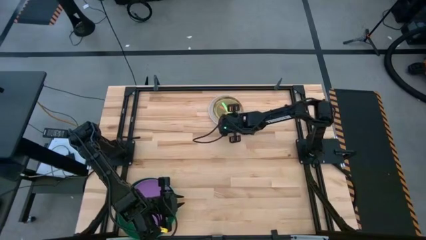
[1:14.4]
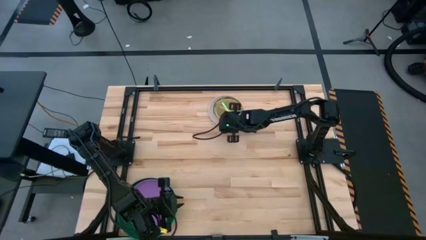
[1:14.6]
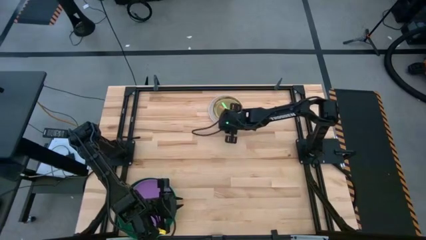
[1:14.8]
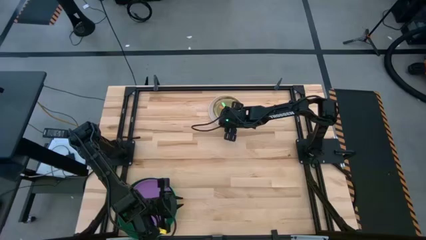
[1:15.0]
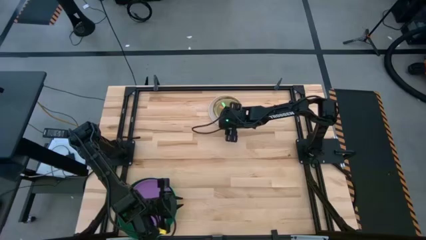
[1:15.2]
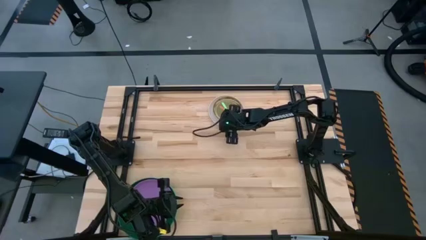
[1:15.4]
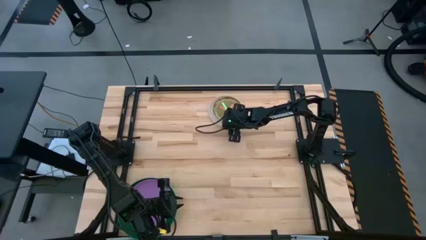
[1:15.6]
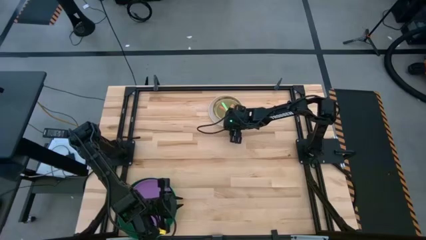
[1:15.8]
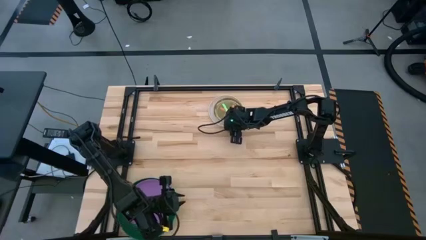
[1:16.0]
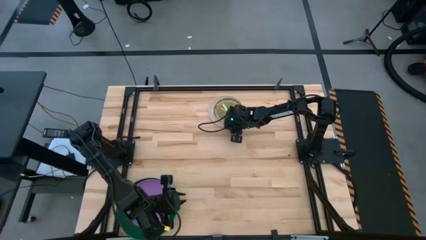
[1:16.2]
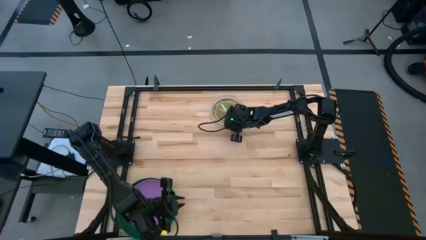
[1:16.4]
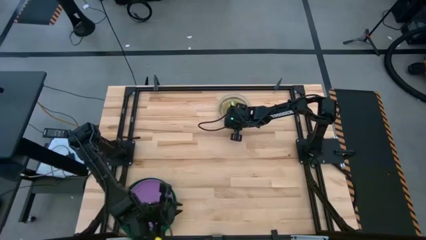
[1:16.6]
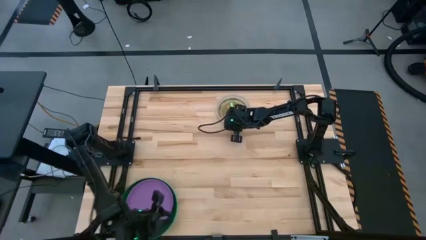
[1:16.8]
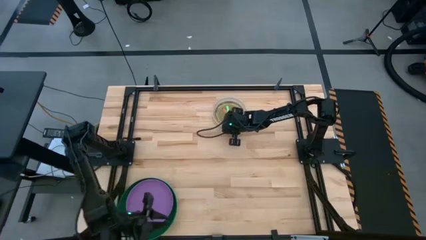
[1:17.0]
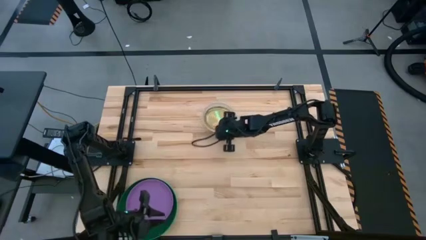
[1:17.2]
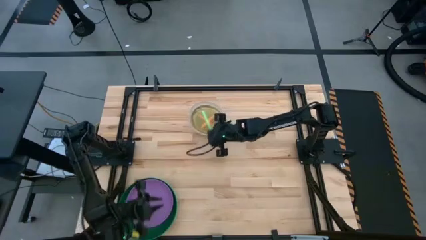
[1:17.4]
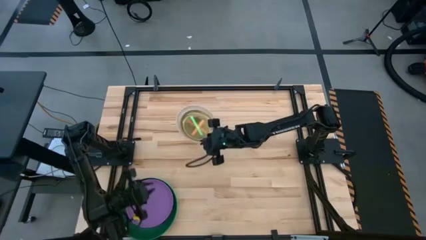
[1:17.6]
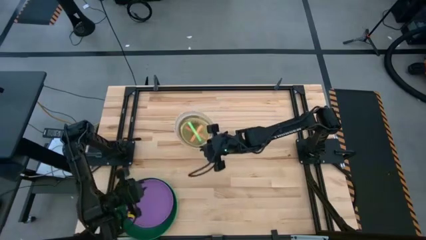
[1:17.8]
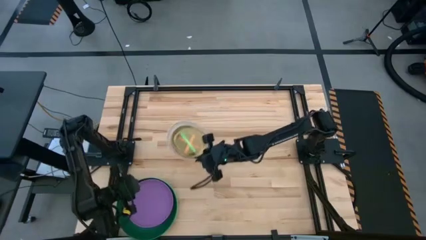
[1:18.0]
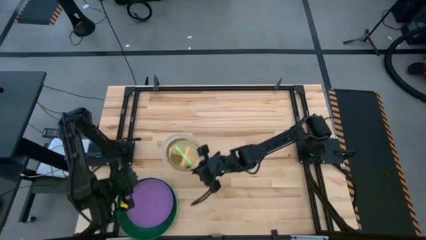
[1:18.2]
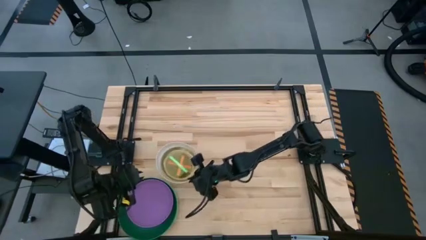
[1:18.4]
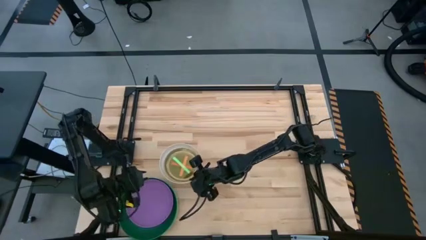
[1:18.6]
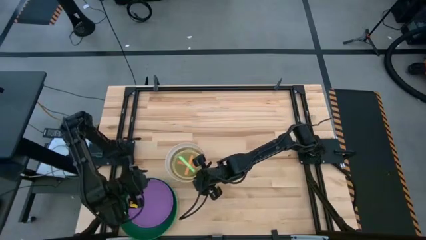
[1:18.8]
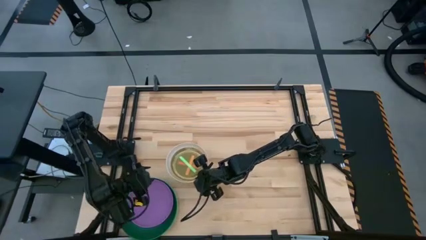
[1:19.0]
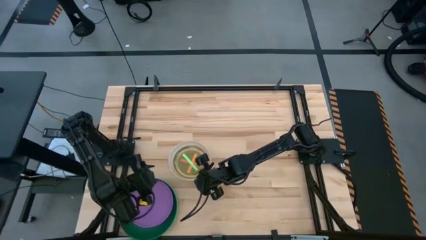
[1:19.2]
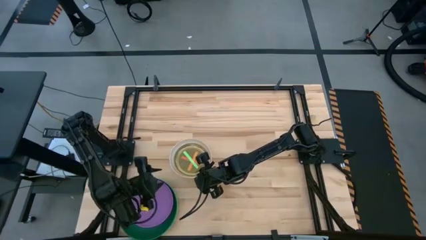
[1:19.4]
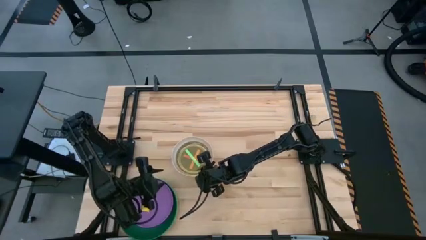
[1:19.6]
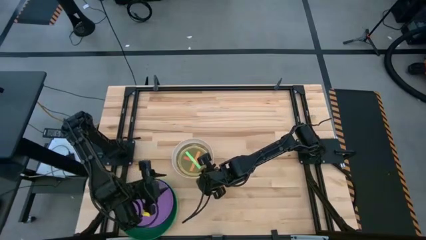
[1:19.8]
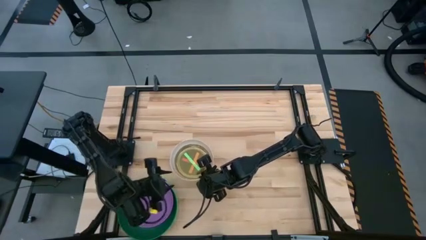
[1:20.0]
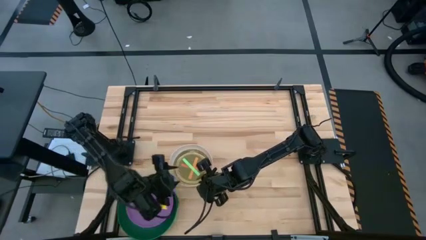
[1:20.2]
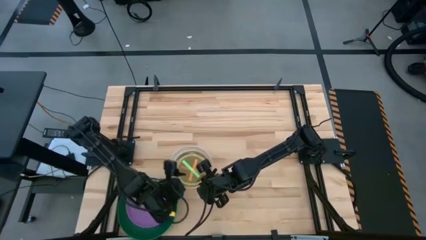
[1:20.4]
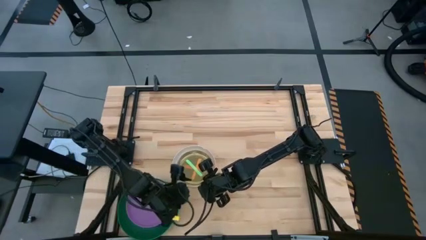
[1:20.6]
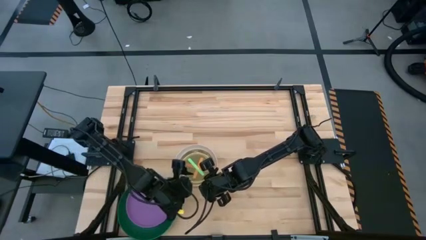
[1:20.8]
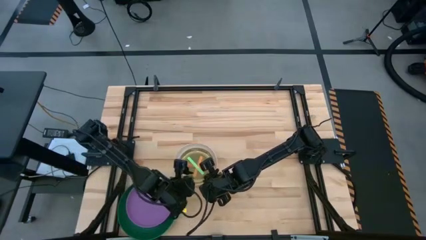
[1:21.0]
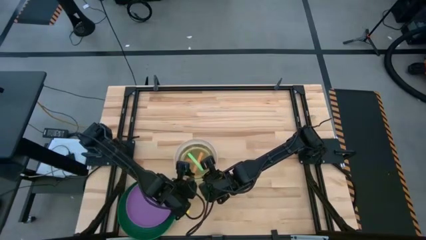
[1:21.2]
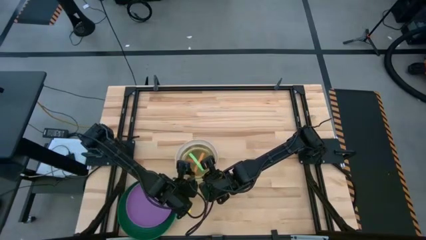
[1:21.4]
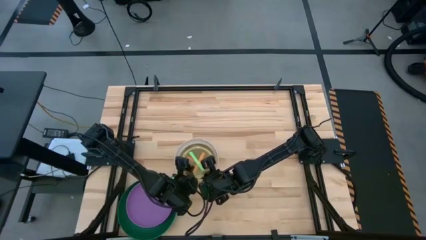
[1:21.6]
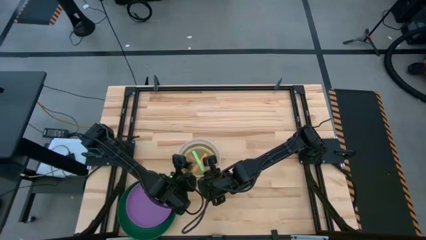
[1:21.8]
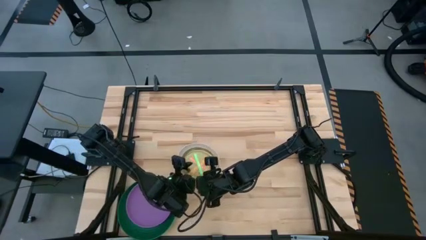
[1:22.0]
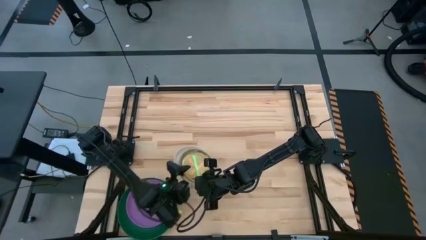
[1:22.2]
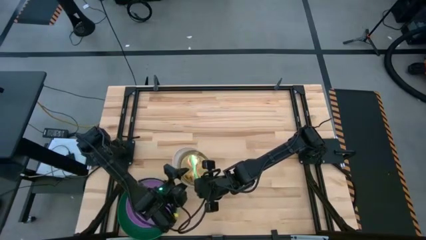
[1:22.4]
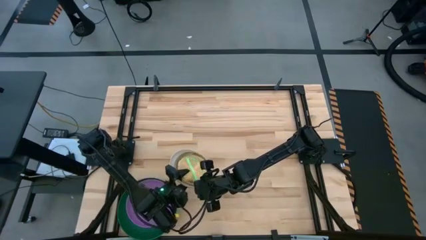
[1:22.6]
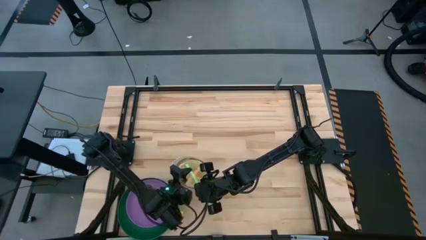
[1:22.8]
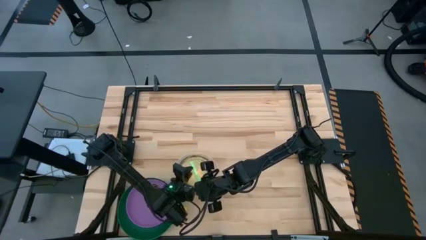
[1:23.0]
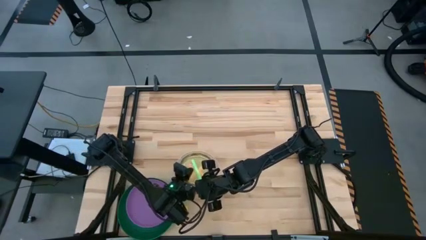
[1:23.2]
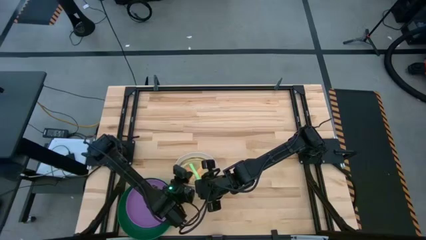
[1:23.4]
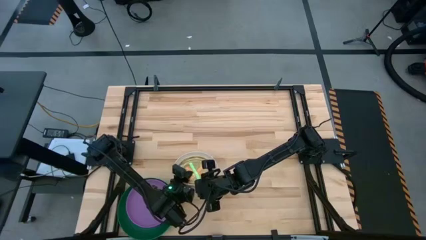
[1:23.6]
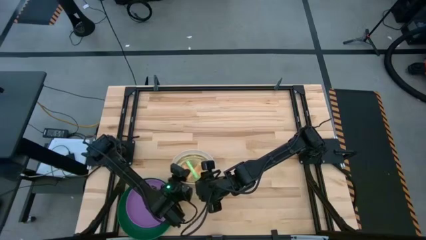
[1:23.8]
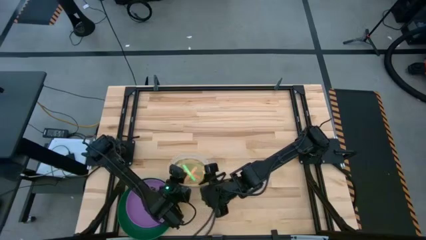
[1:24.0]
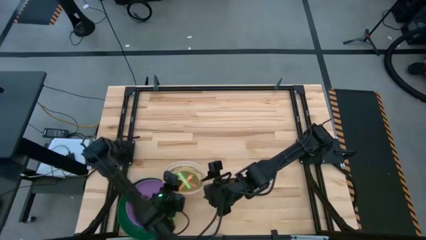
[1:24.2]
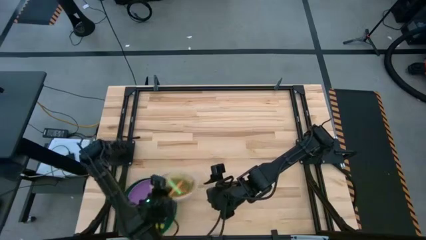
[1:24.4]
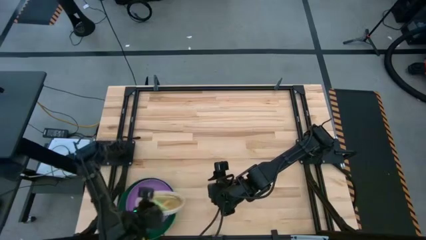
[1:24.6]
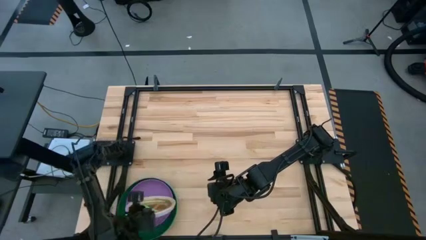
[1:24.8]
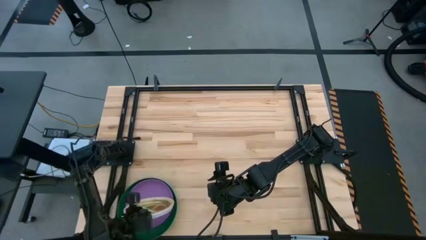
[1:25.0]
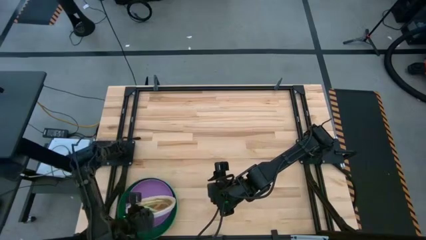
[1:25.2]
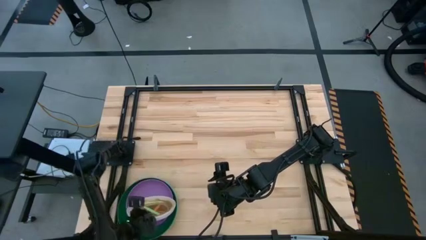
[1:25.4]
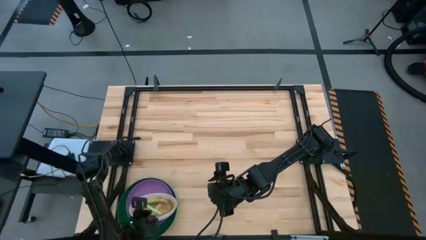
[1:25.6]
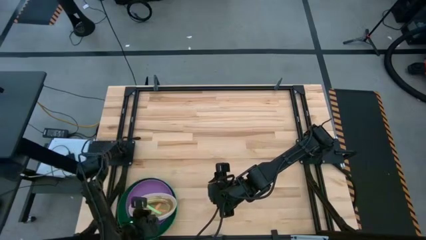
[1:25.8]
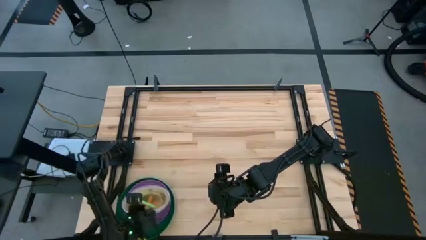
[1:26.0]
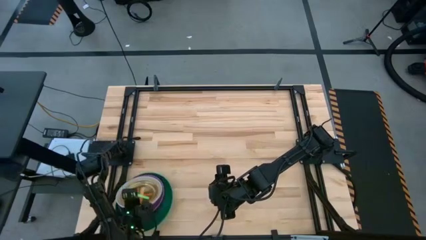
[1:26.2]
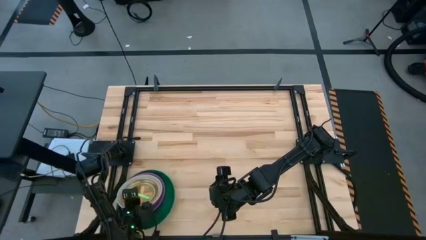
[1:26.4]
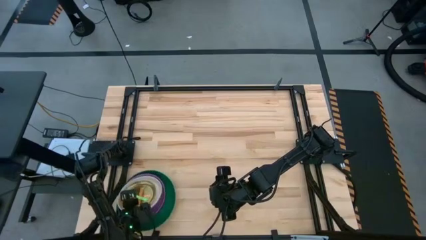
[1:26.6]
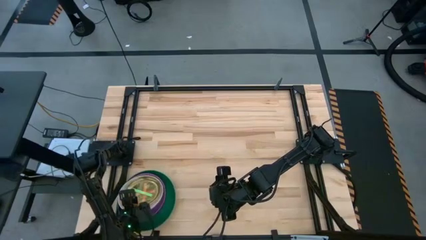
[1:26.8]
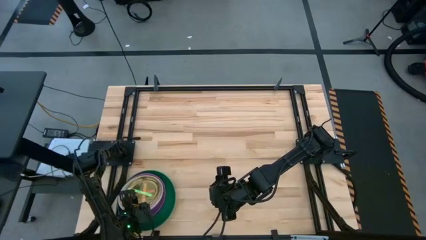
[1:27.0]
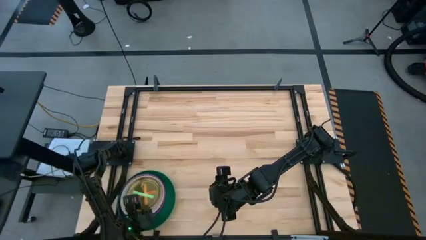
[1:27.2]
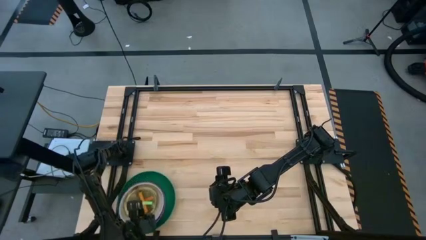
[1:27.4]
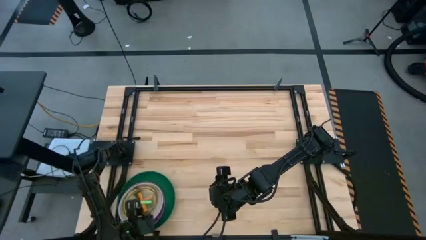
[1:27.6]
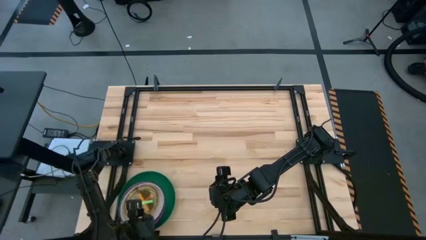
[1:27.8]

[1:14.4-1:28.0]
Task: Stack plastic plates
Stack the stacked plates on top of the purple plates
